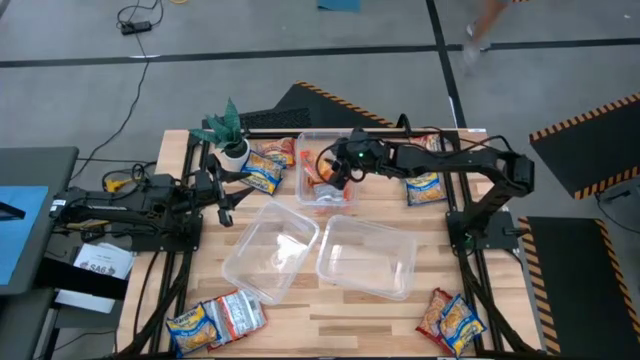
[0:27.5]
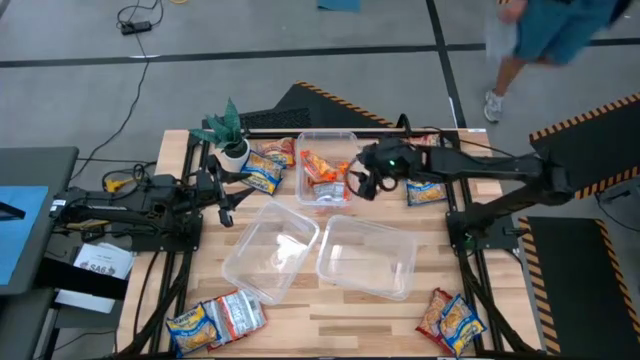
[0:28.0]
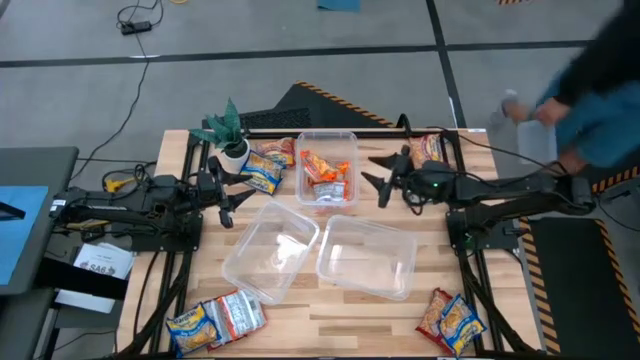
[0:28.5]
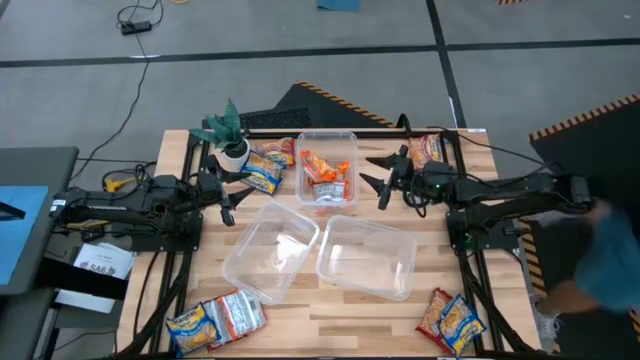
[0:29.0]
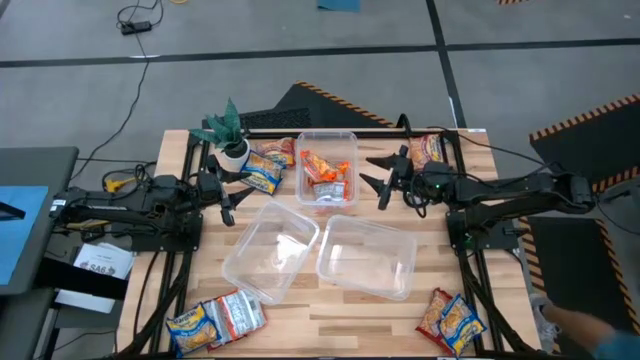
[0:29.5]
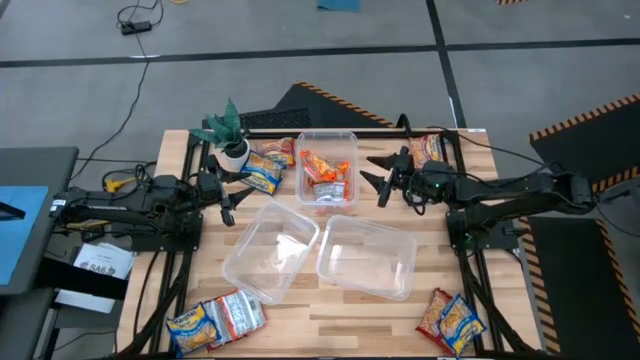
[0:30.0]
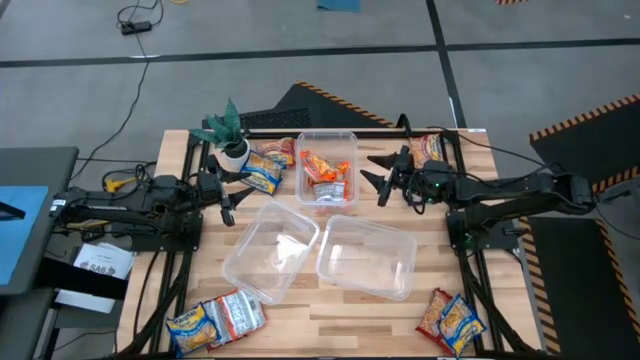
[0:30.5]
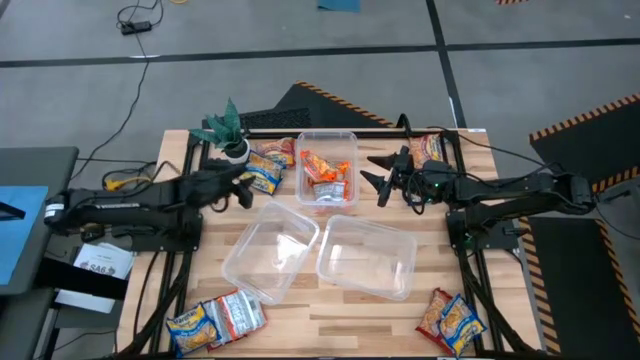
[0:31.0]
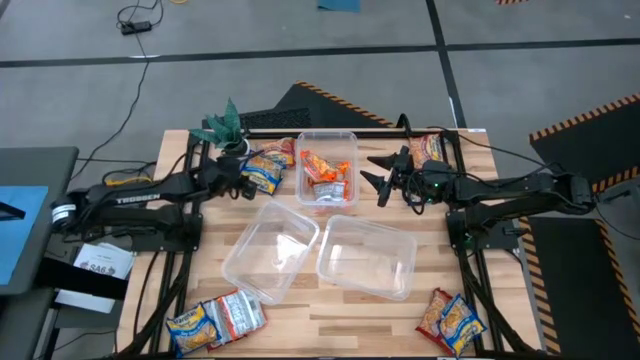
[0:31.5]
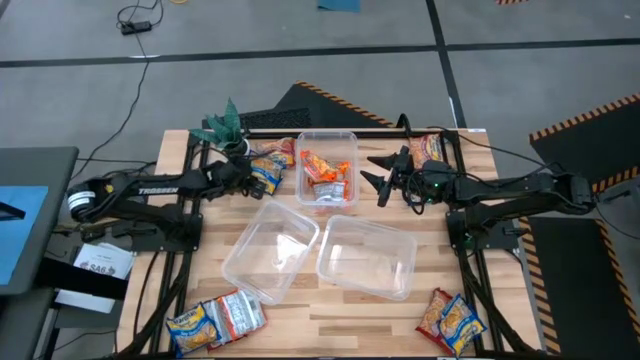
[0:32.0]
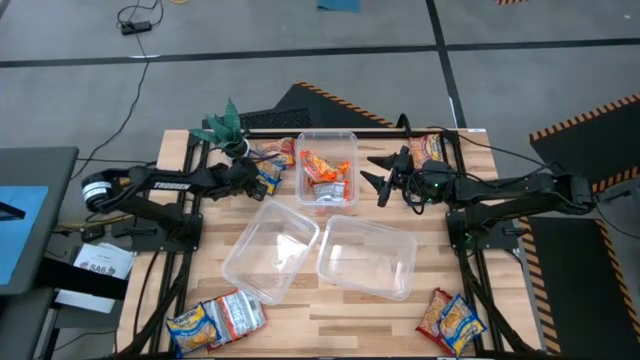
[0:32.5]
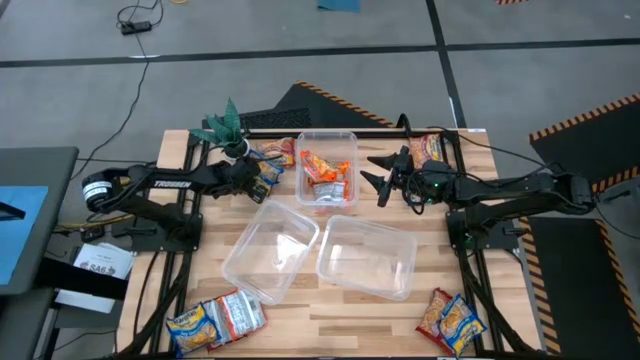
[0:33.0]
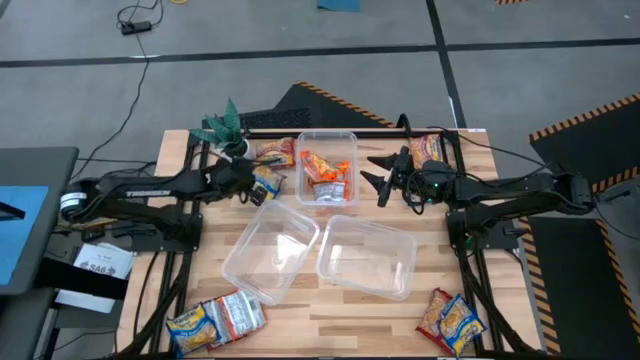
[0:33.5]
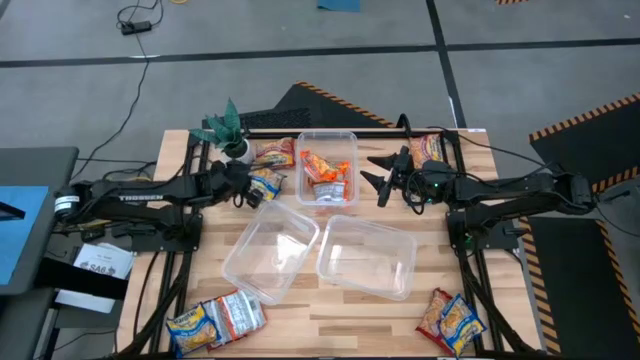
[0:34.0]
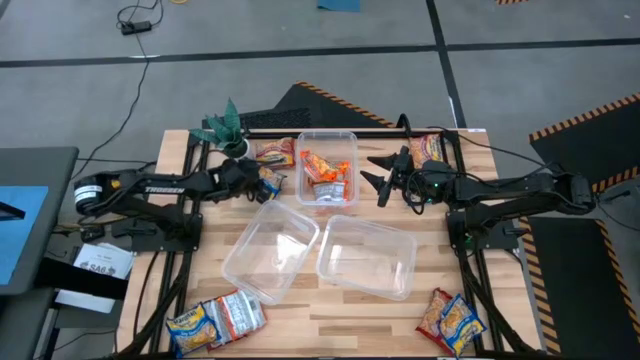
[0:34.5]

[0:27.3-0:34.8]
Task: Sort Maruchan noodles
Put the blue noodle pack into the bottom left transparent bin

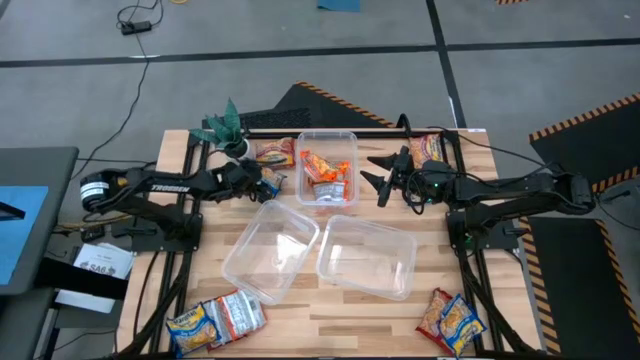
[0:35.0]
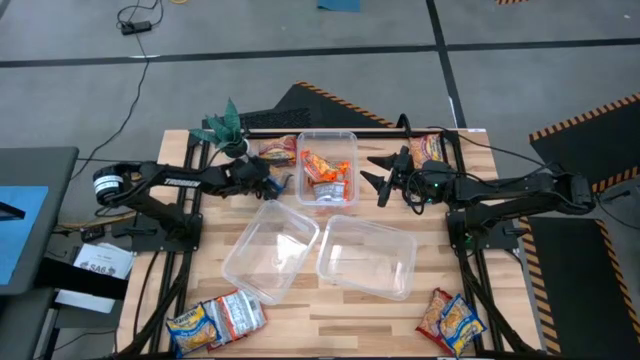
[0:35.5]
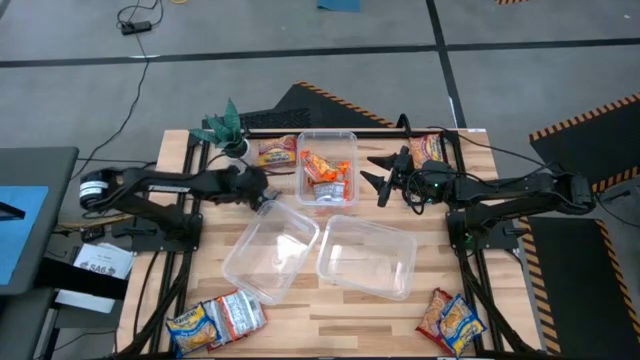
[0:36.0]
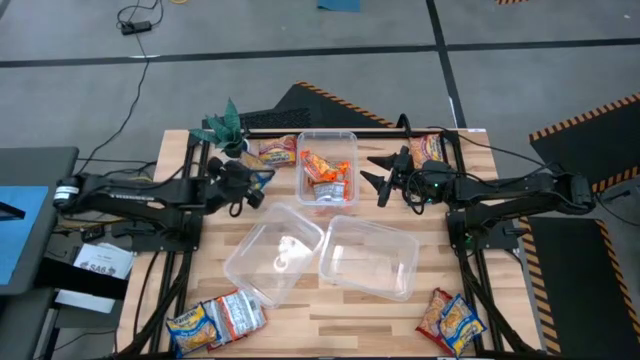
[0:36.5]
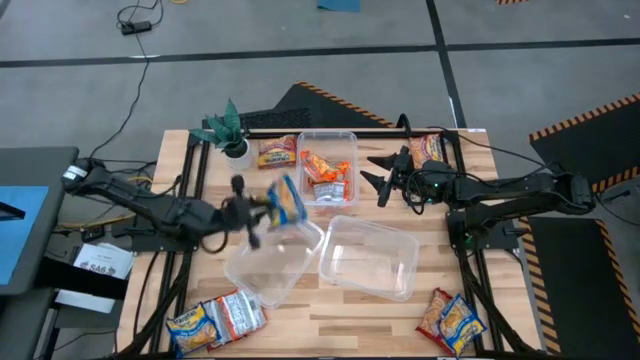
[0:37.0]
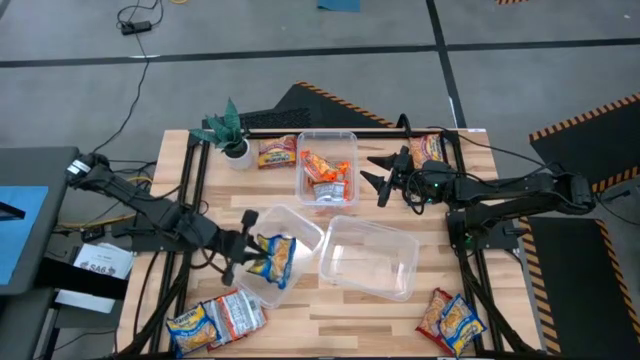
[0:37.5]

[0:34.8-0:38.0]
Put the blue noodle pack into the bottom left transparent bin

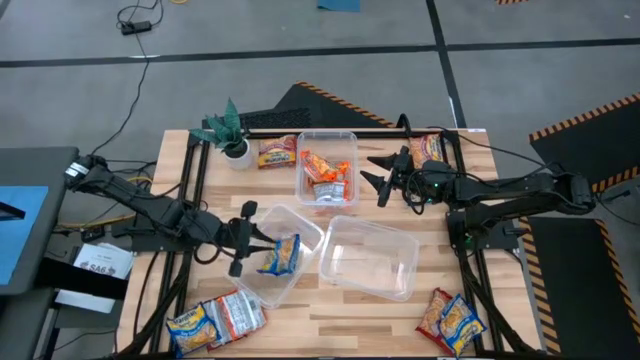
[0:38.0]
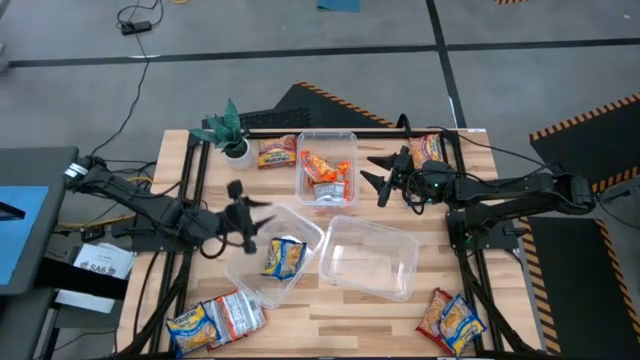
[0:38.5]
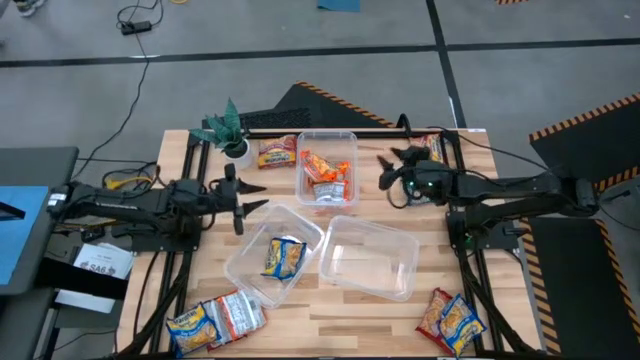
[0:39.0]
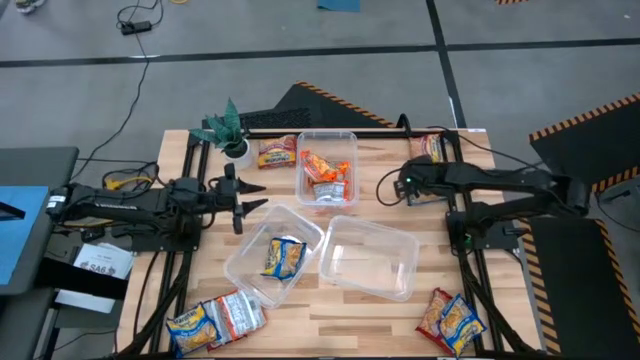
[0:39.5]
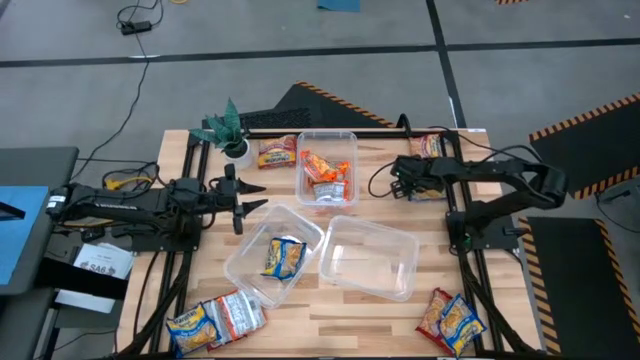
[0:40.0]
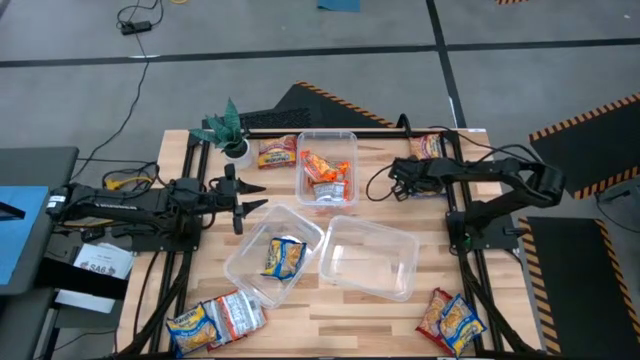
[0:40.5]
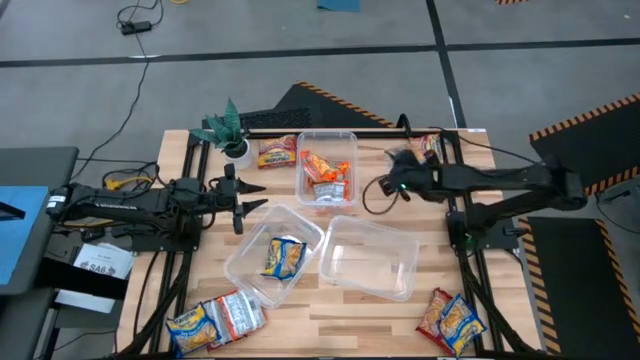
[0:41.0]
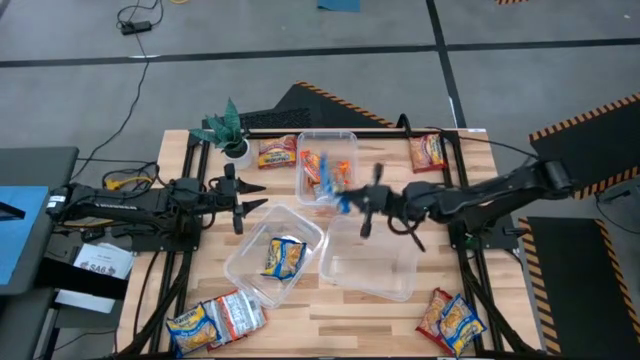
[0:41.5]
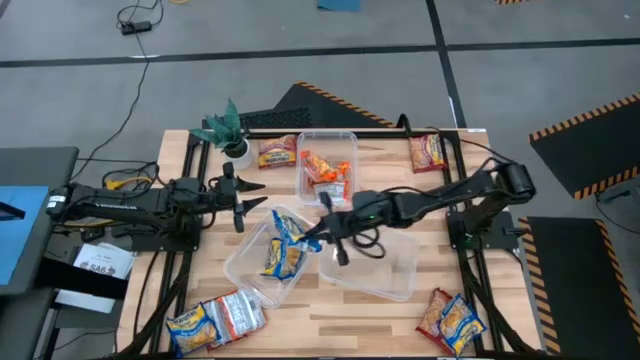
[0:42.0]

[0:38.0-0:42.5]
Put the blue noodle pack into the bottom left transparent bin

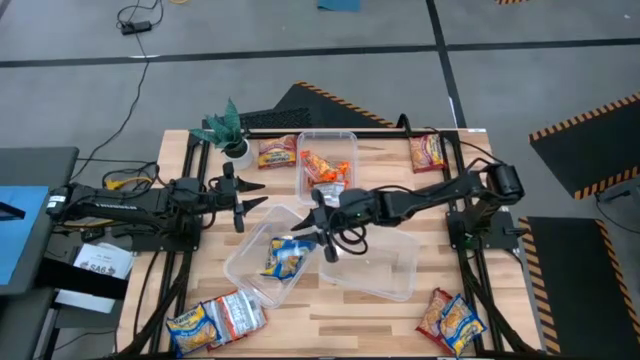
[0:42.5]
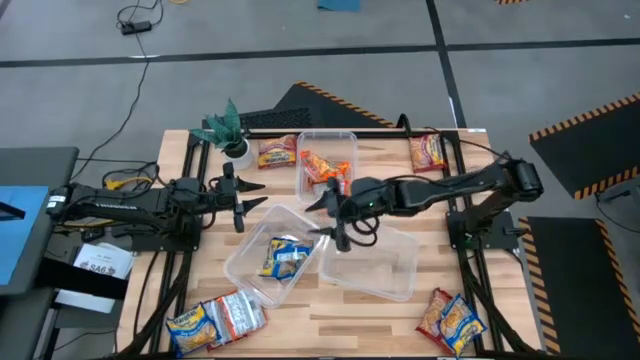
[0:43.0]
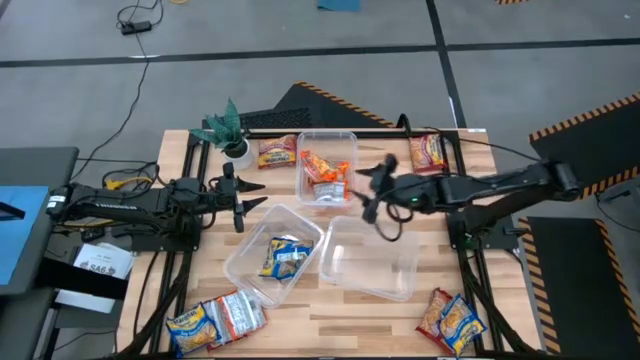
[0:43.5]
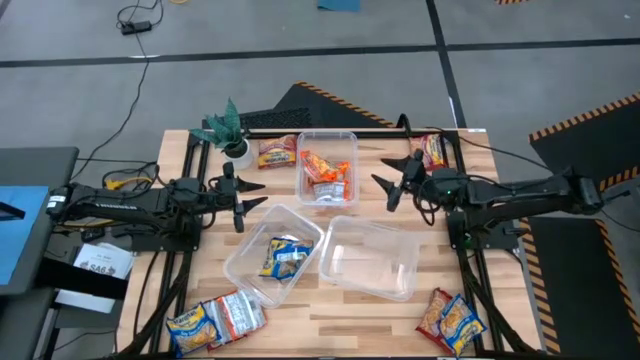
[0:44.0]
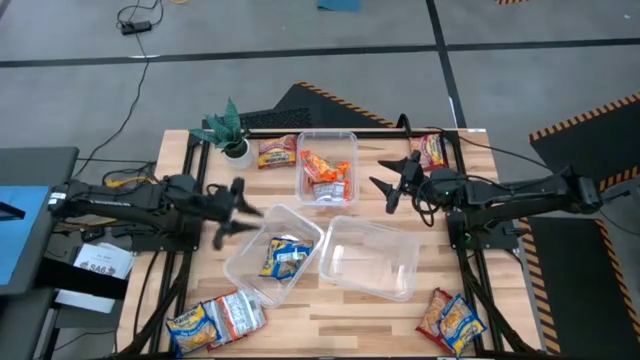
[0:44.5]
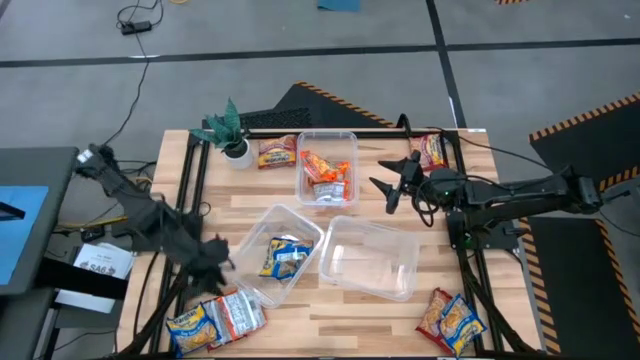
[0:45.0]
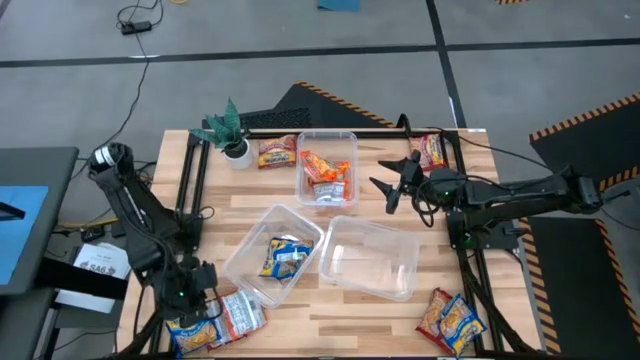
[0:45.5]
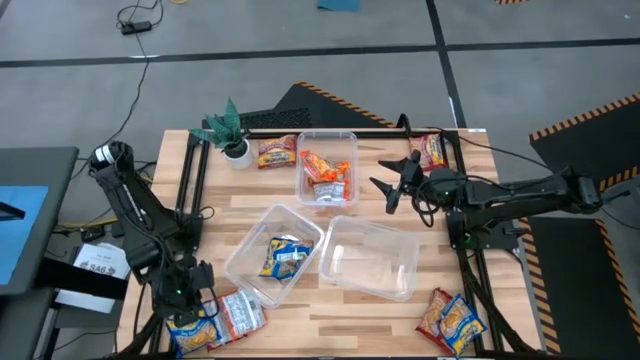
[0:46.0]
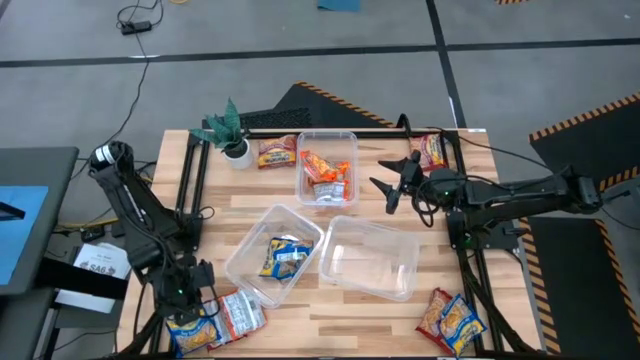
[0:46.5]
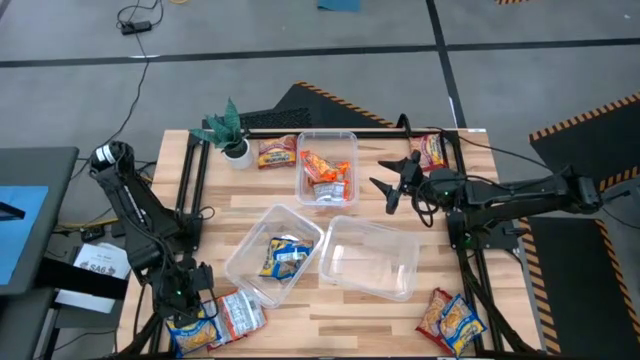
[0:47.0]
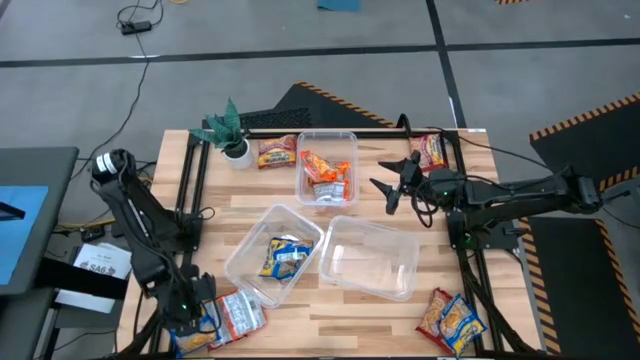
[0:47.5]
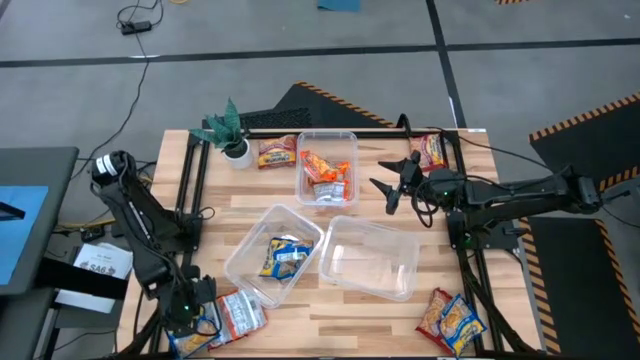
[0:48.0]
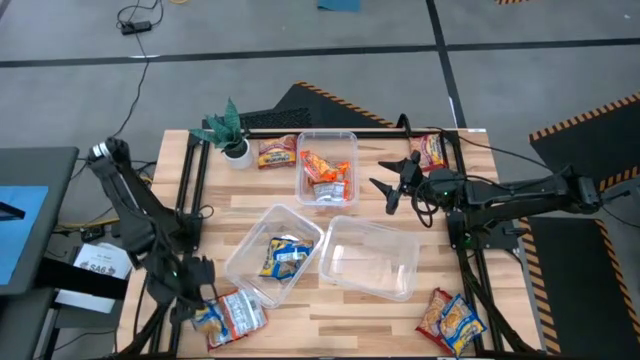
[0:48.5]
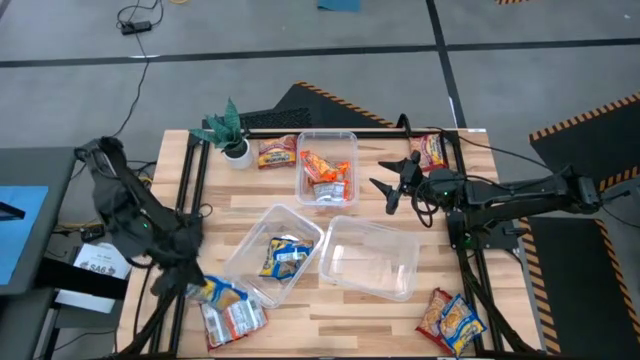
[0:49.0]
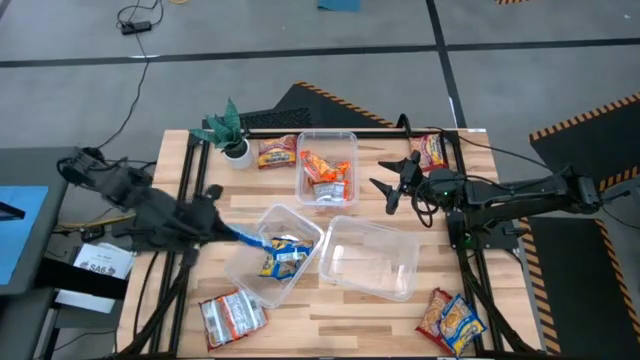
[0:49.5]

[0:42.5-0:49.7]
Put the noodle pack into the bottom left transparent bin
